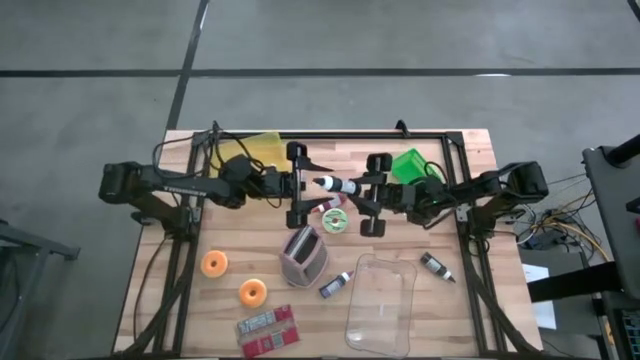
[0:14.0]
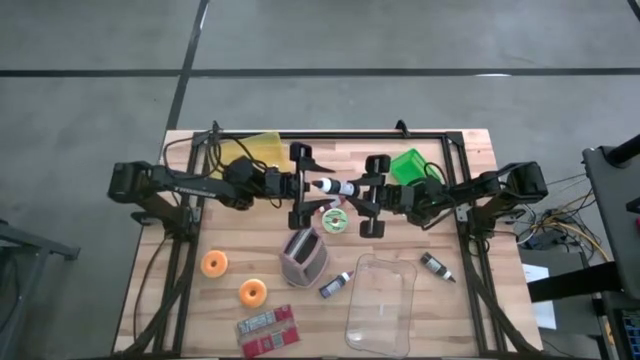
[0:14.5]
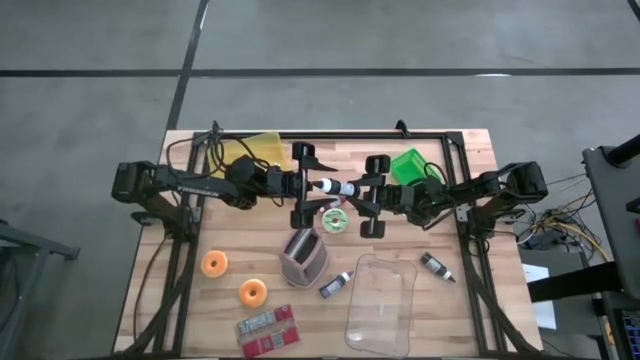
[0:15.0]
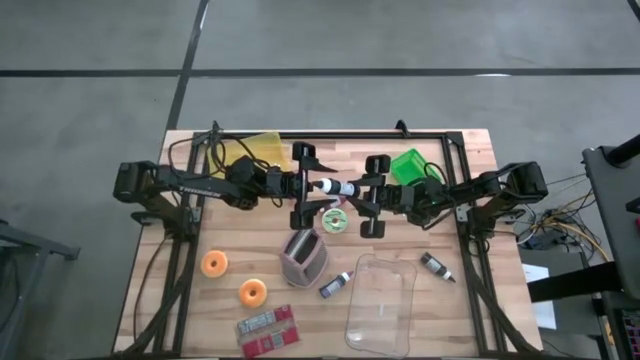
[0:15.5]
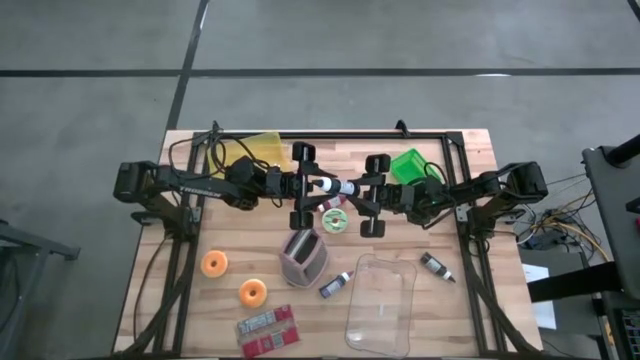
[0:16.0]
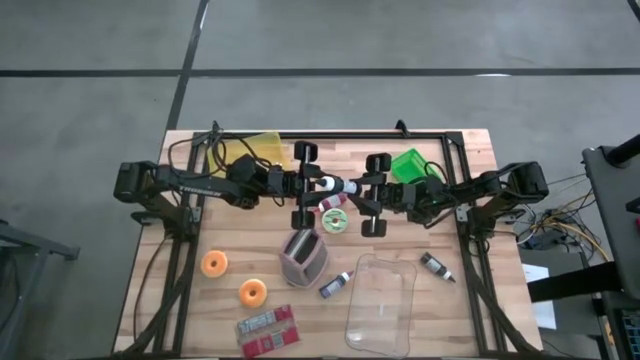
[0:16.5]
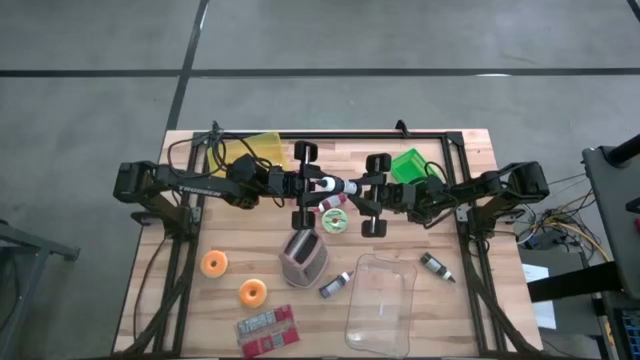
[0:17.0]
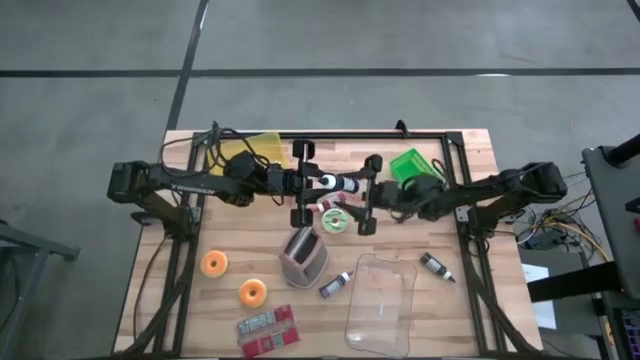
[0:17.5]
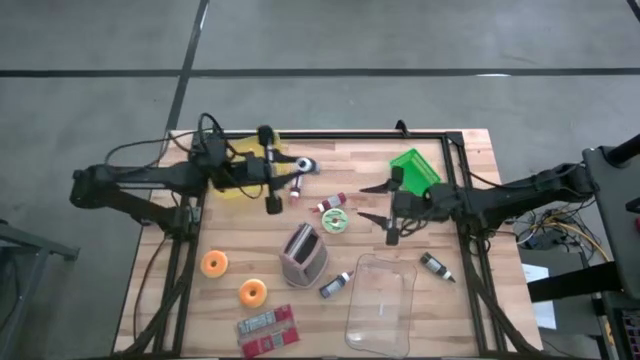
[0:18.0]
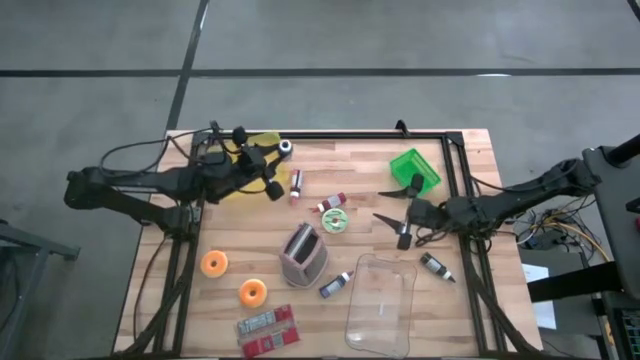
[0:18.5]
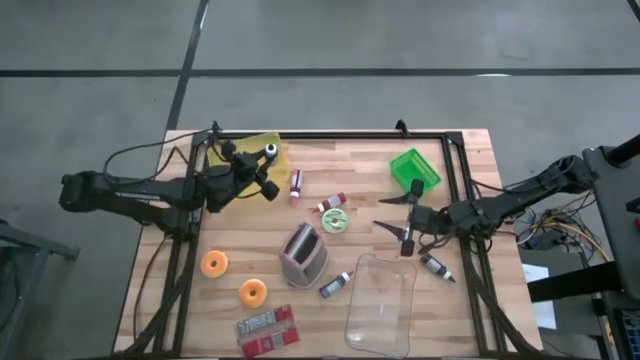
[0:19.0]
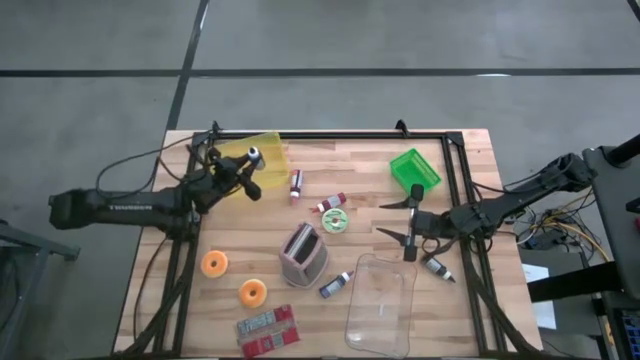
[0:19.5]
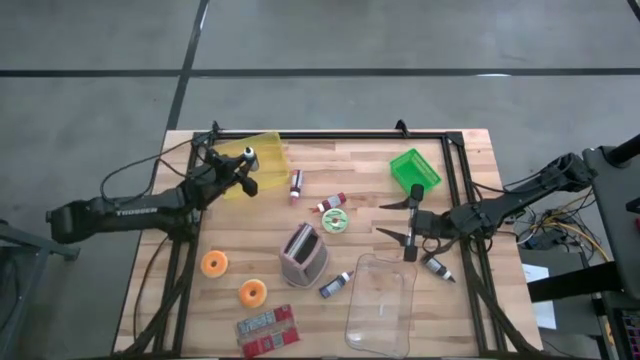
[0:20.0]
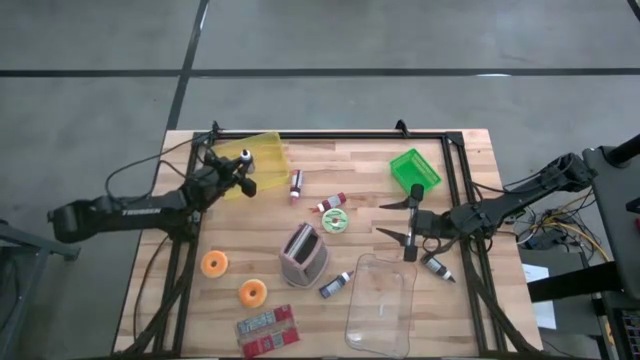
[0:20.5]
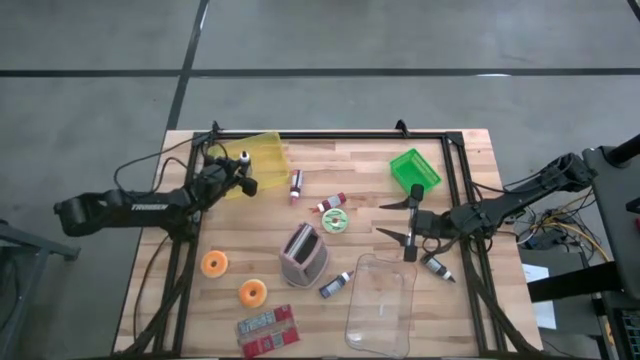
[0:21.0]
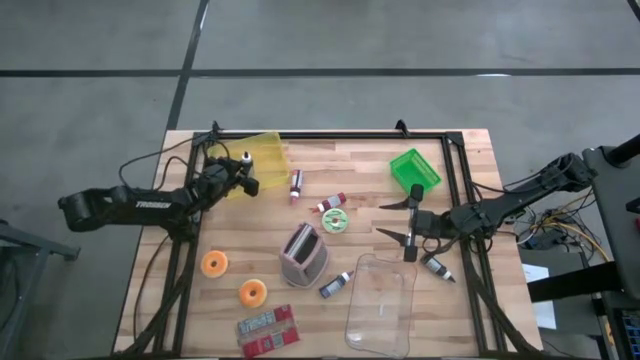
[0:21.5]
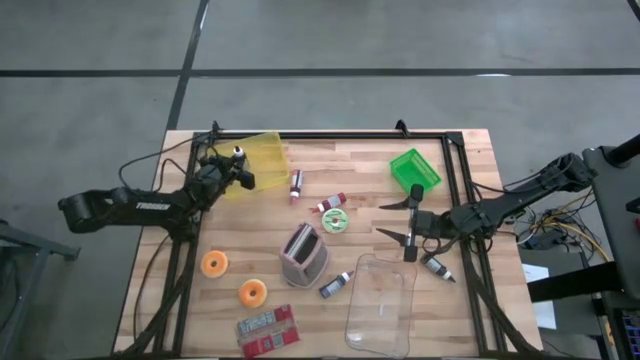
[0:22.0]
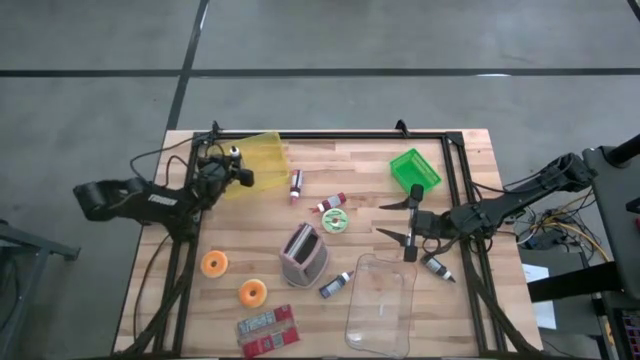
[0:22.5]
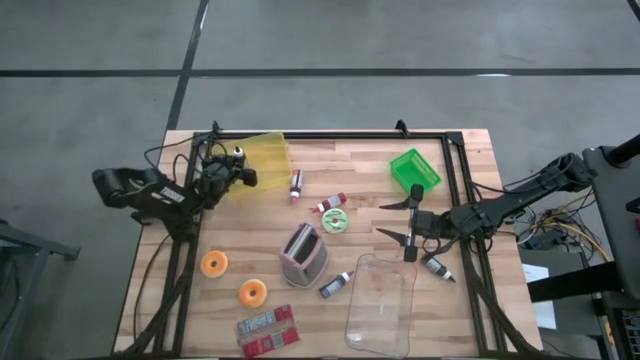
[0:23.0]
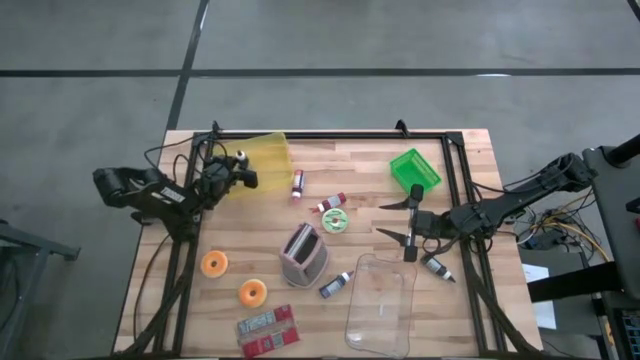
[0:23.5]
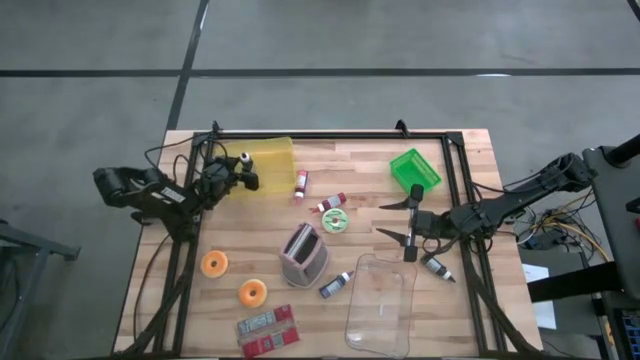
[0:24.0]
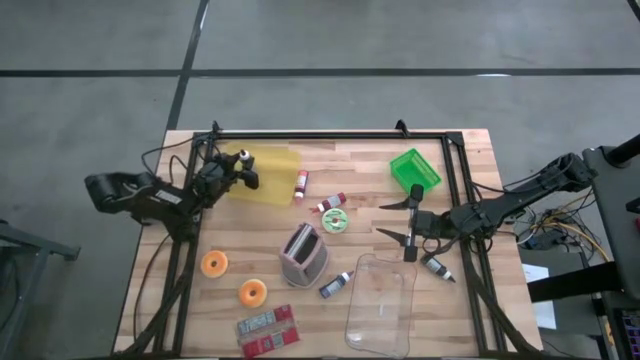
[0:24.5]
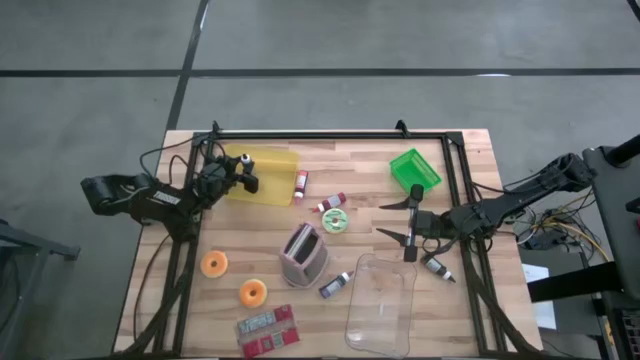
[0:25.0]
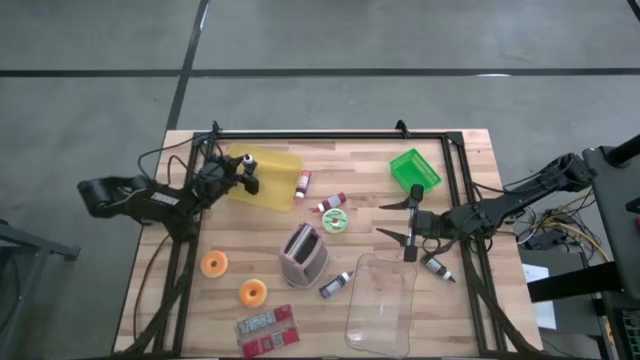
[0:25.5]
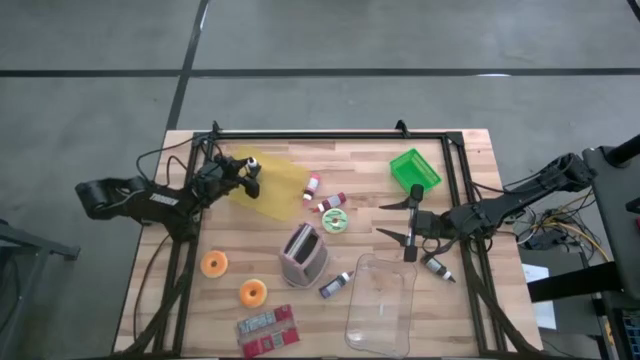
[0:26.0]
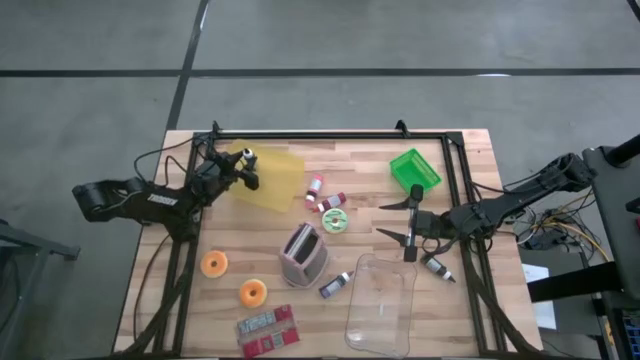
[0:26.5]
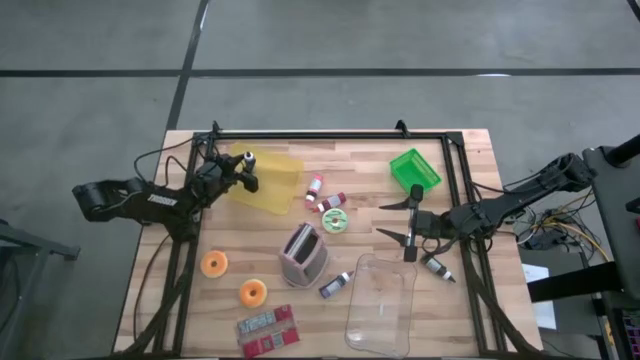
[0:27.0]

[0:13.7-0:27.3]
Task: Pick & Place Food Item
Put the left black food coloring into the yellow bin

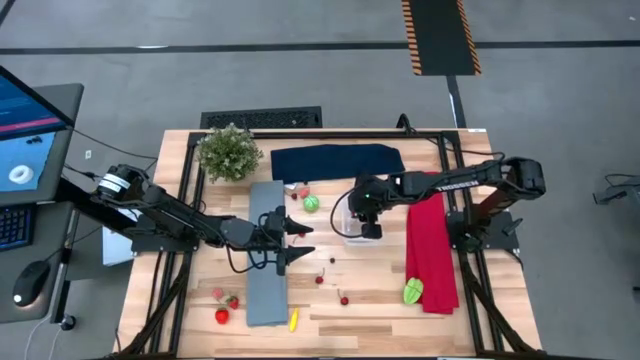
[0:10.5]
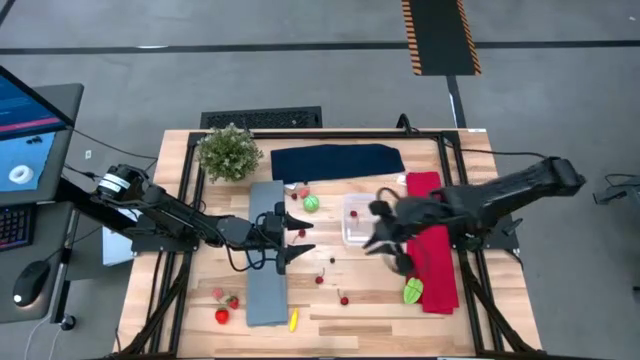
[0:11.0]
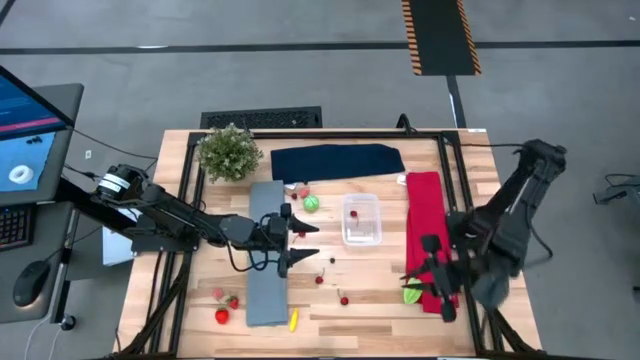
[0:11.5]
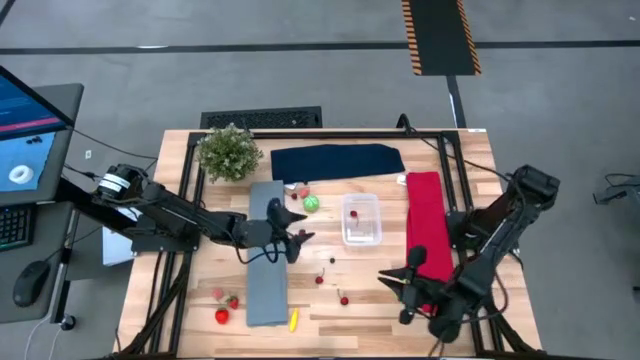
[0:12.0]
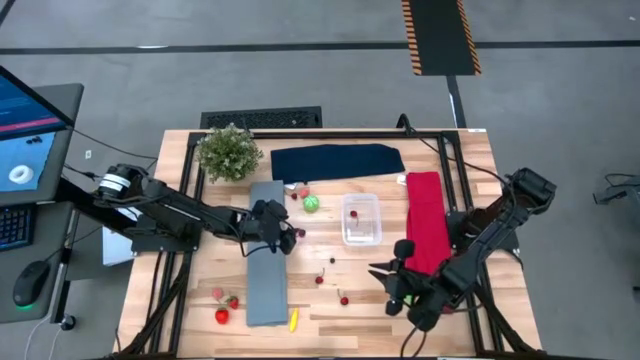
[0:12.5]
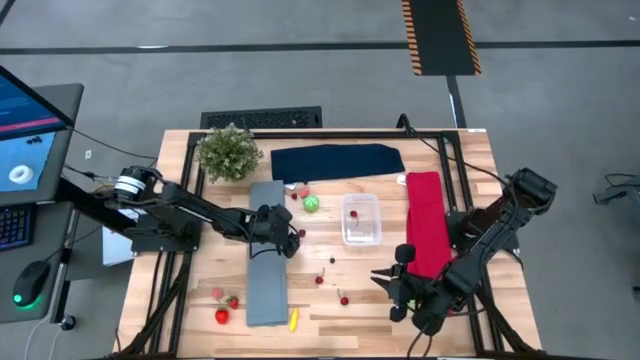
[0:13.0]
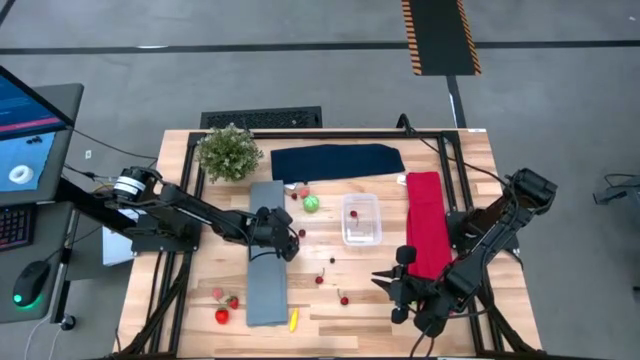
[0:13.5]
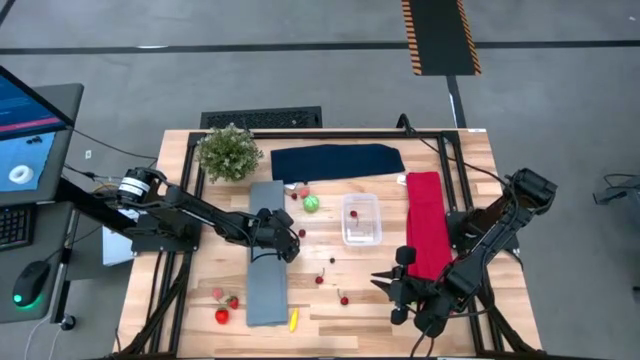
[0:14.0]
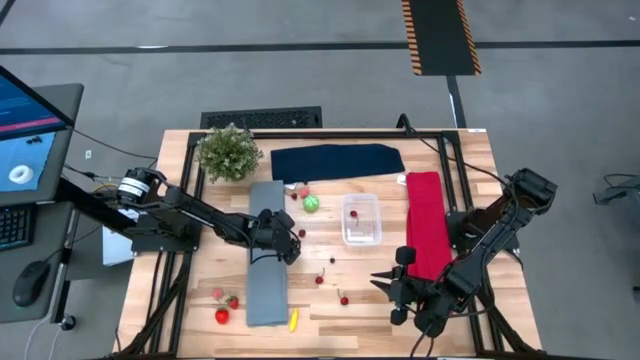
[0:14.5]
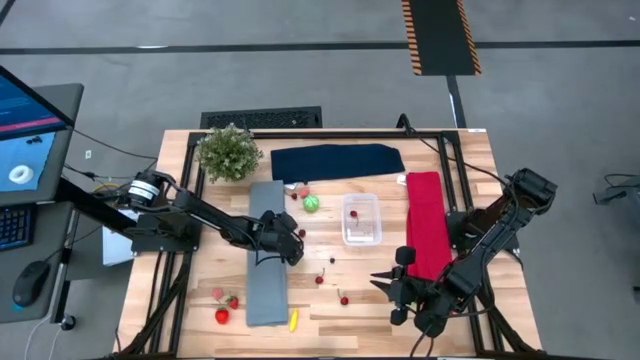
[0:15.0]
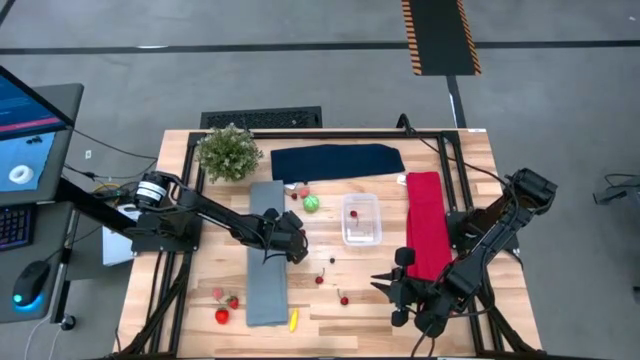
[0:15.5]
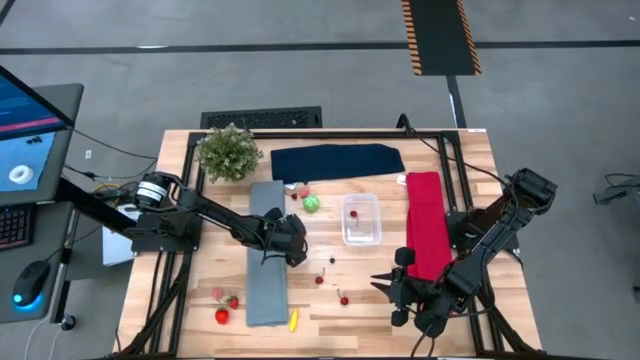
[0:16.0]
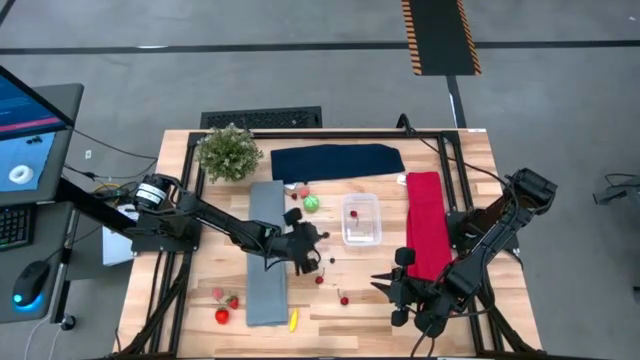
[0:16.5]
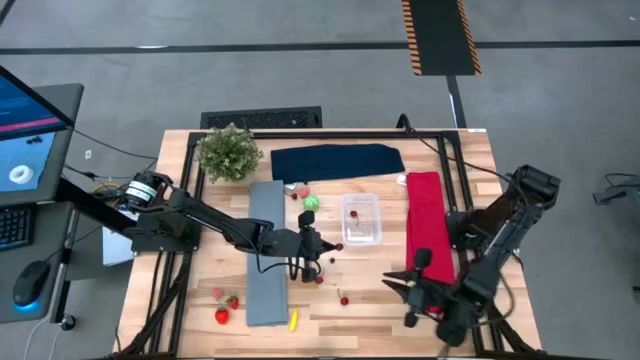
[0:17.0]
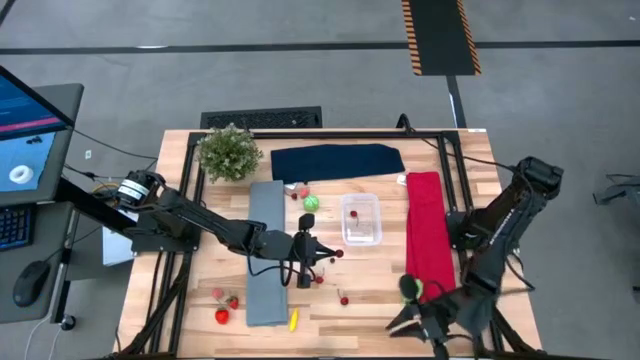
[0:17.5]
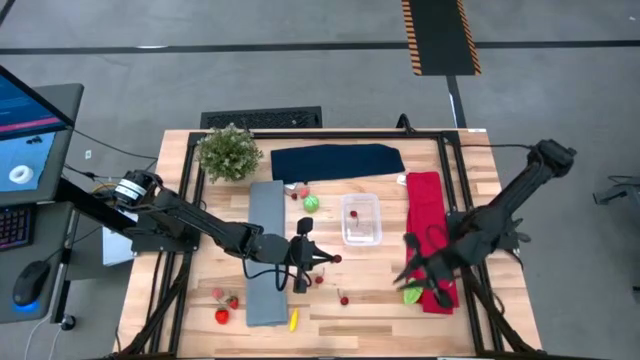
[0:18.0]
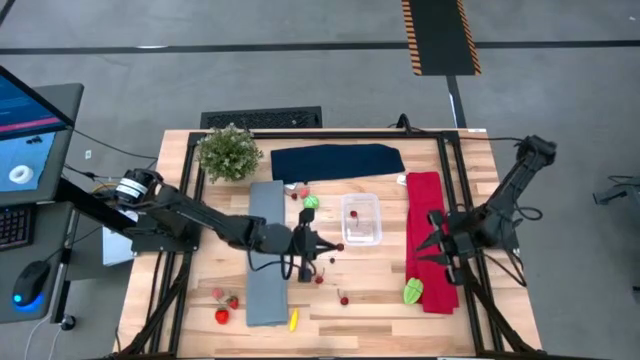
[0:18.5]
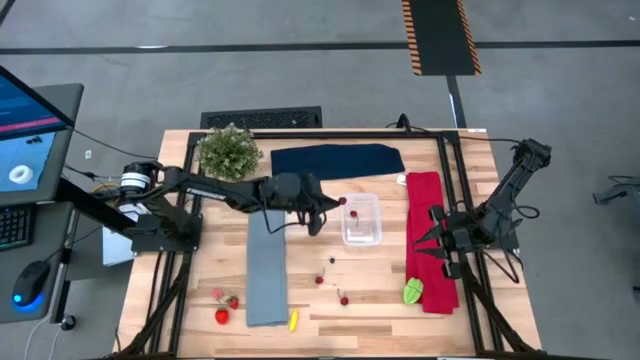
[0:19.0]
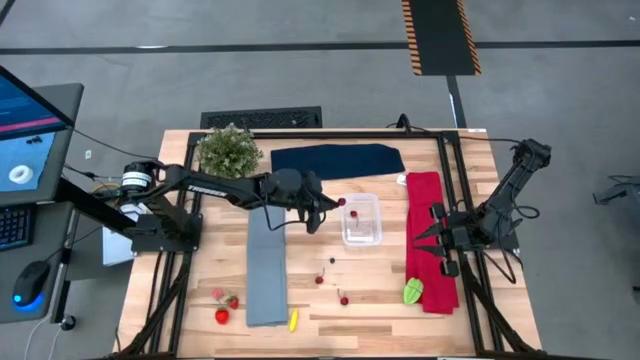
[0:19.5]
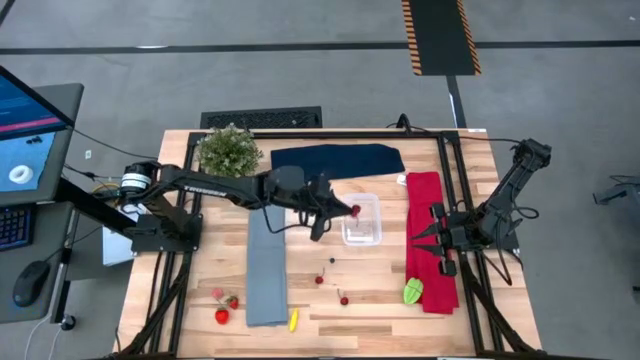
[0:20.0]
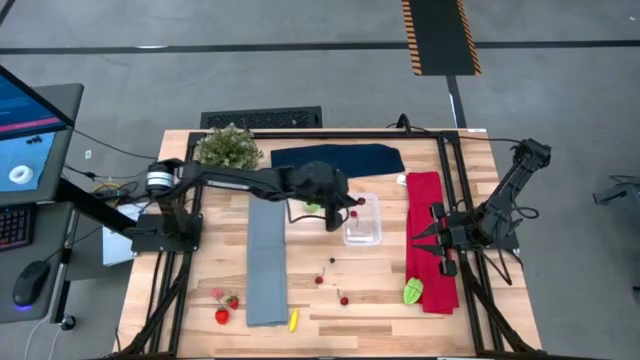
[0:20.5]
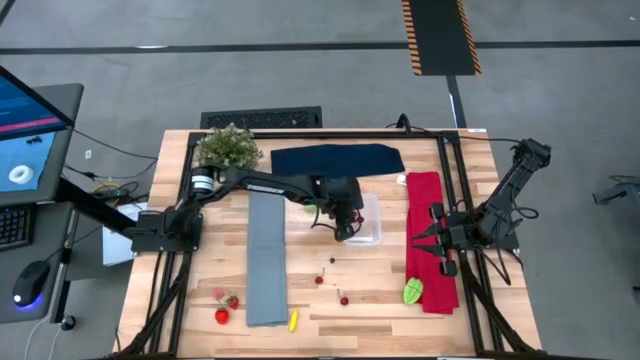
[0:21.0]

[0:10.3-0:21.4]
Task: Pick and placing Produce into tupperware
Put the red cherry into the transparent bin
